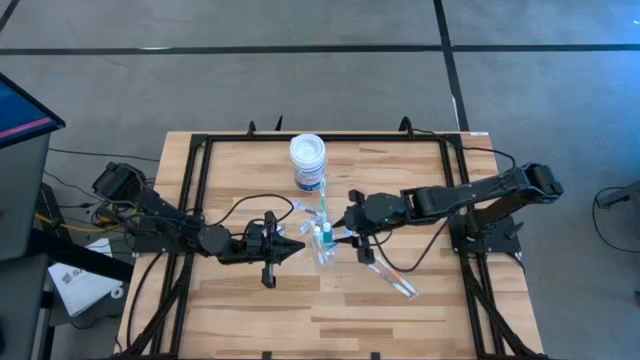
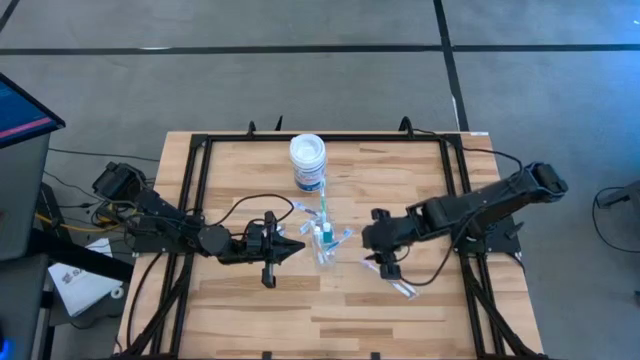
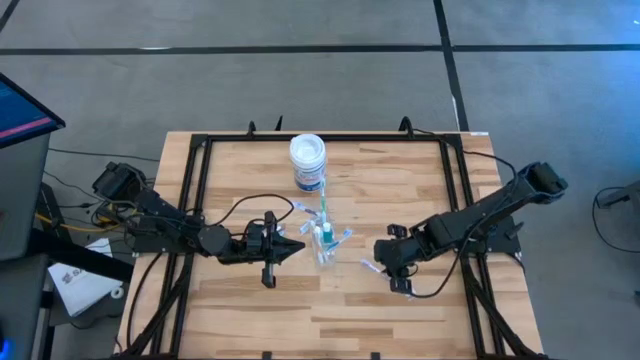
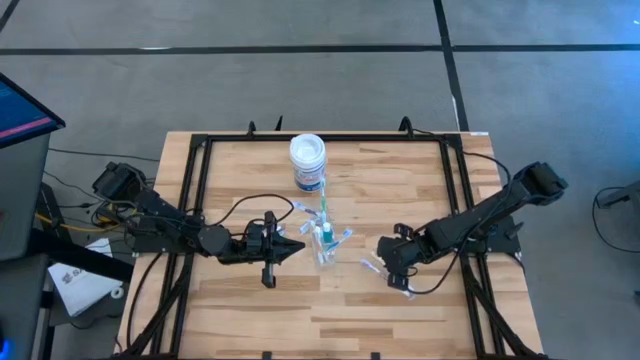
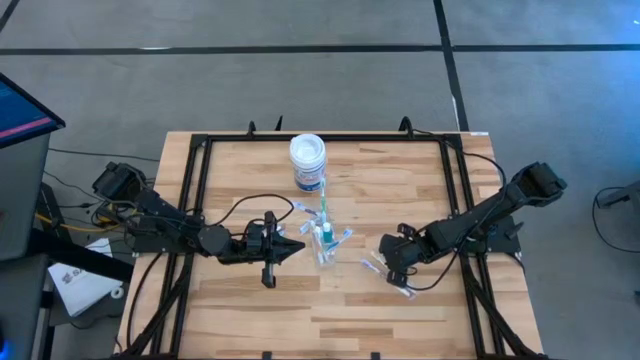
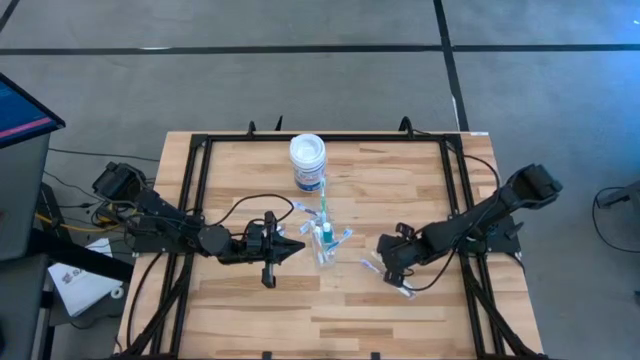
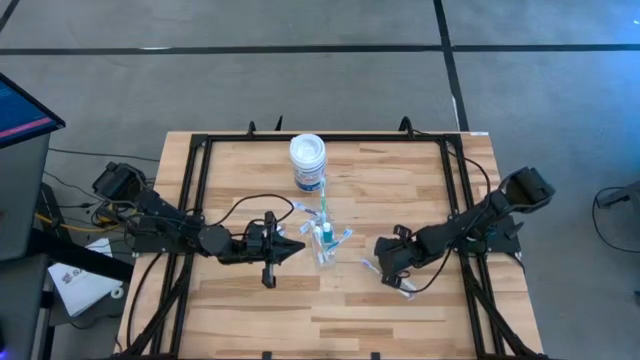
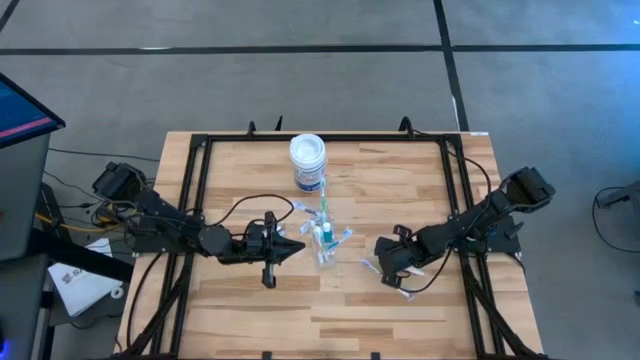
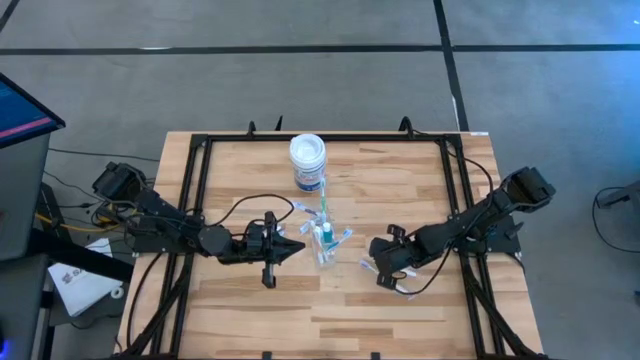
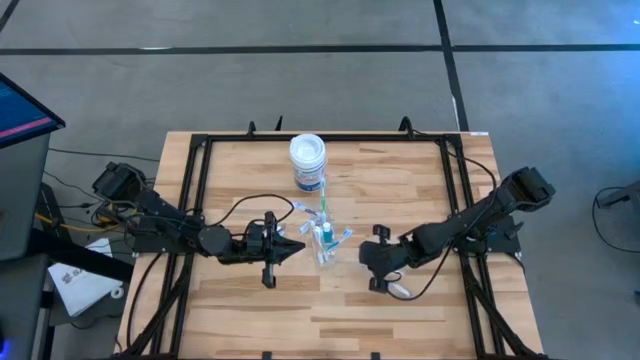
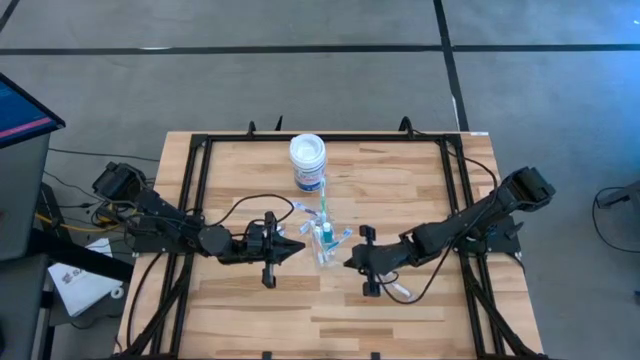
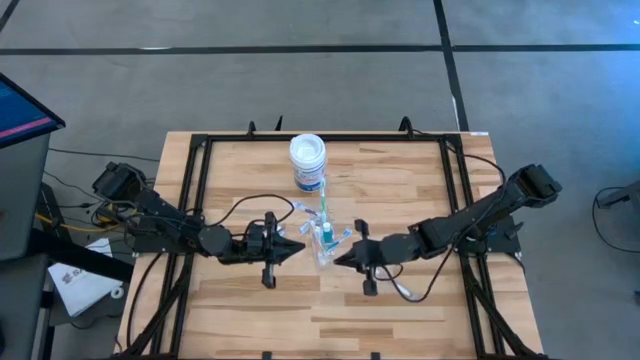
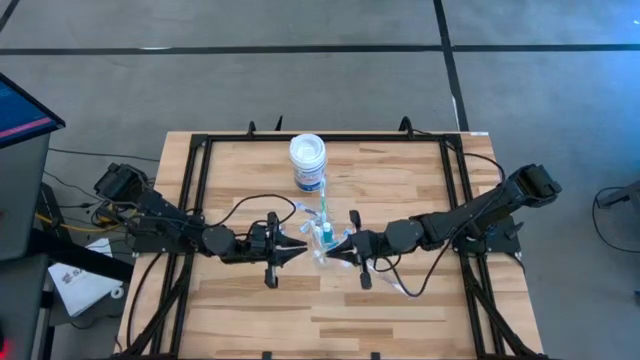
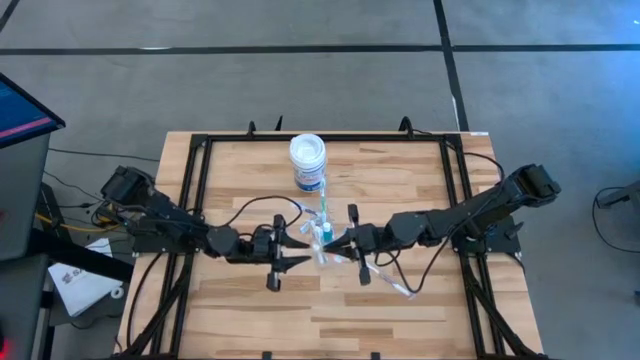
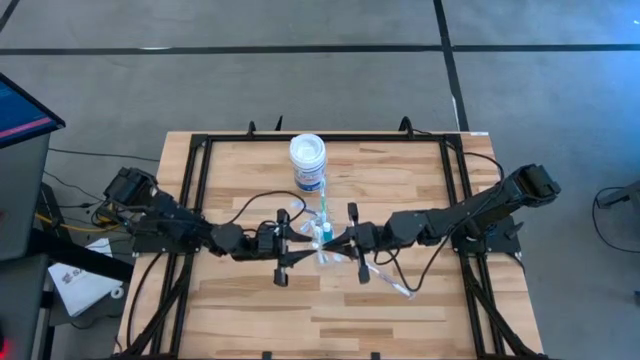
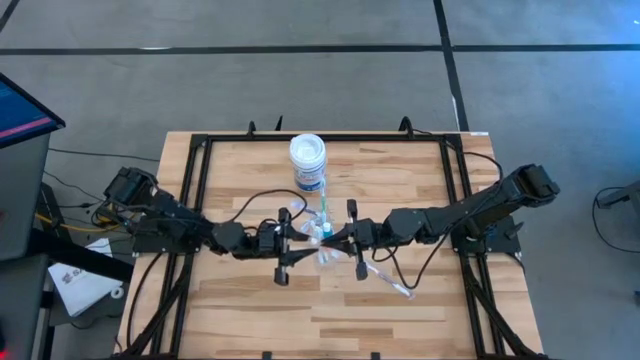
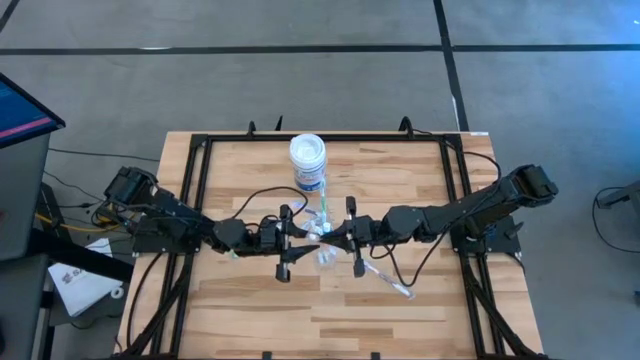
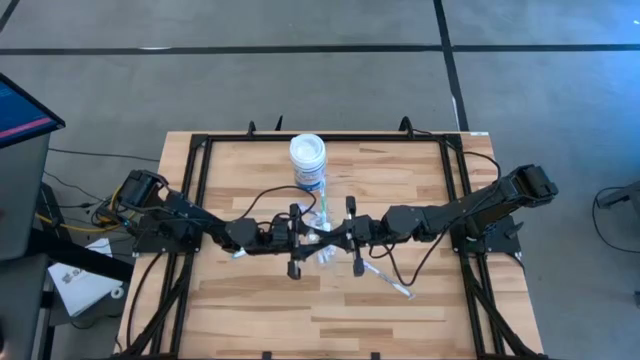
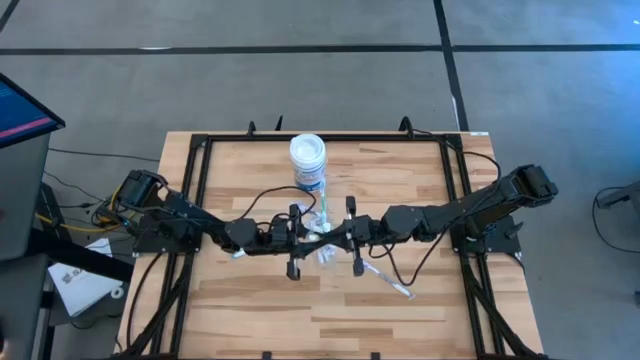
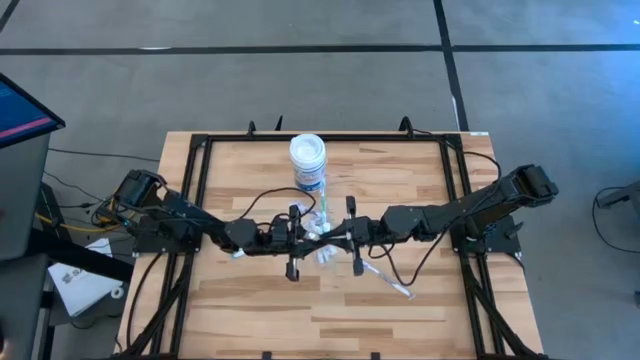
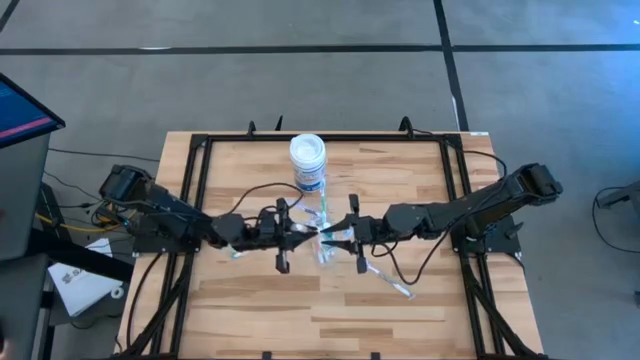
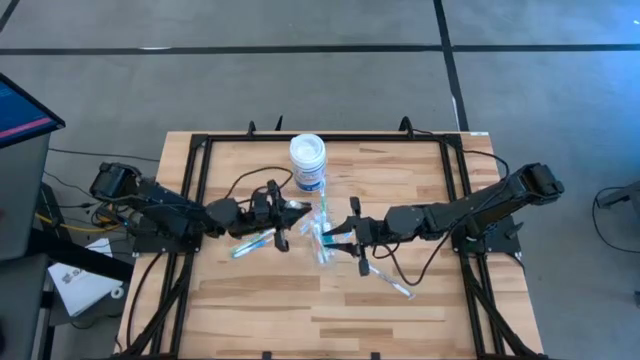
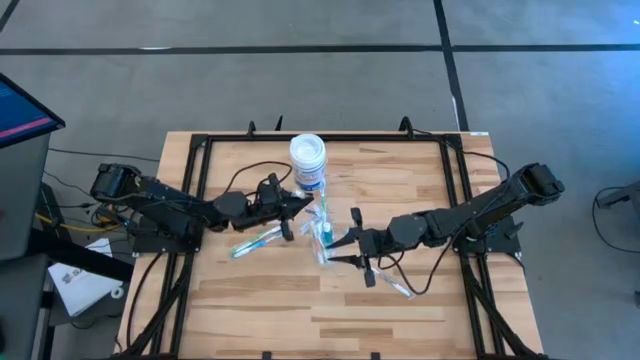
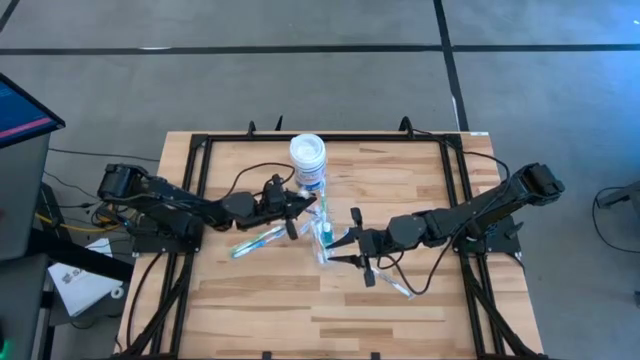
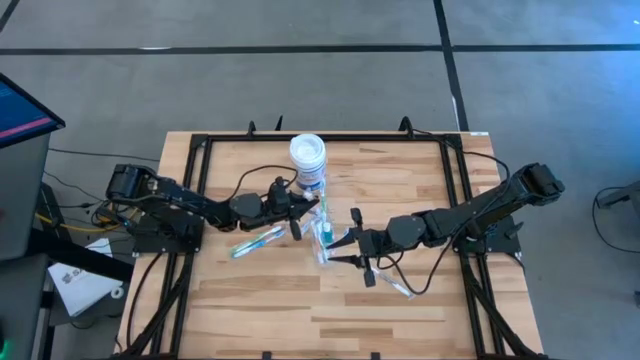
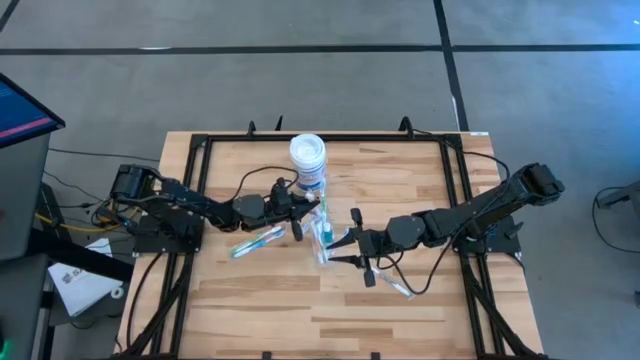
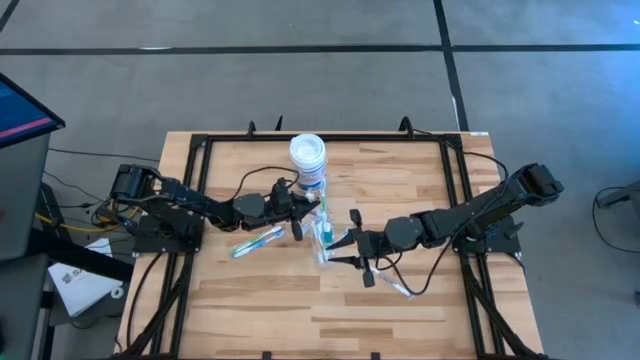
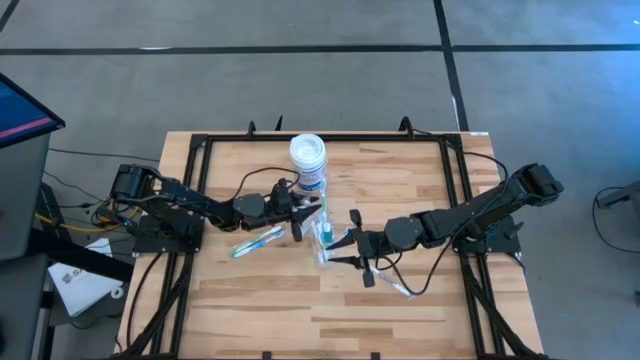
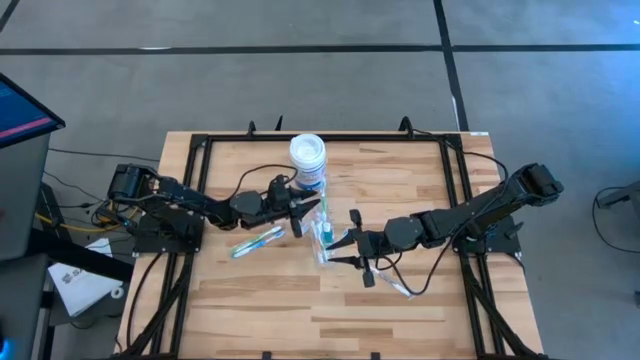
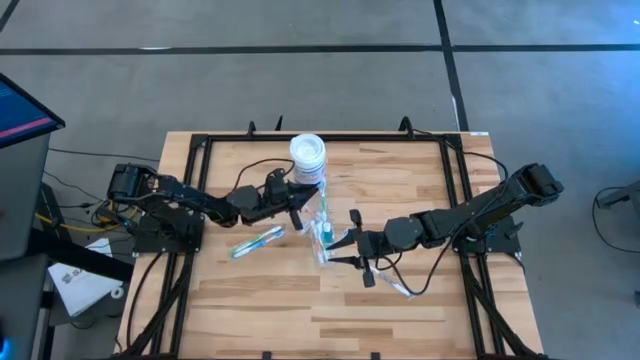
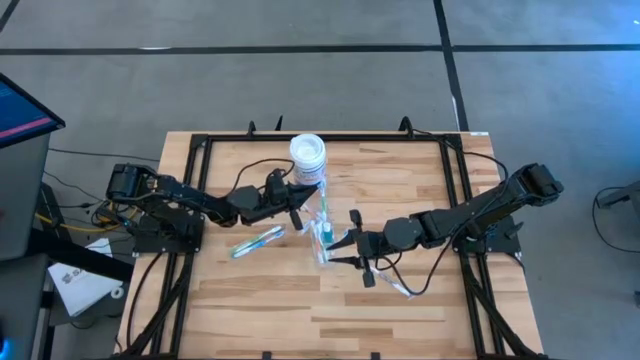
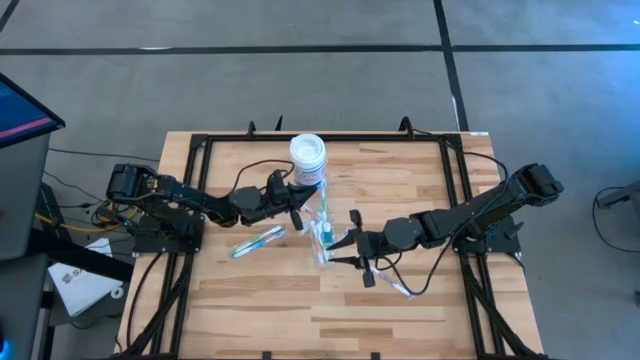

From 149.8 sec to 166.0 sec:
Task: Pick & Place toothbrushing station
Put the orange toothbrush into the Transparent organizer

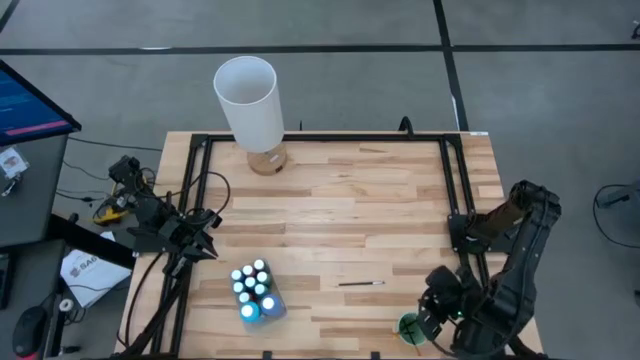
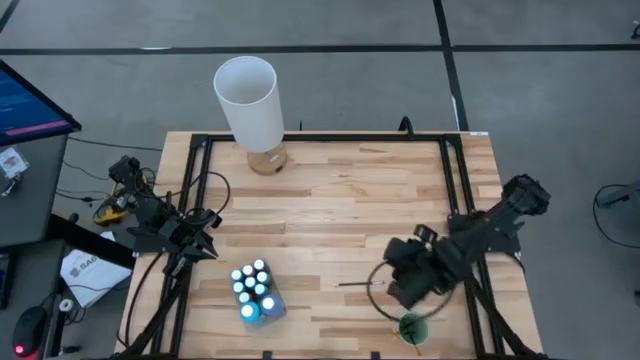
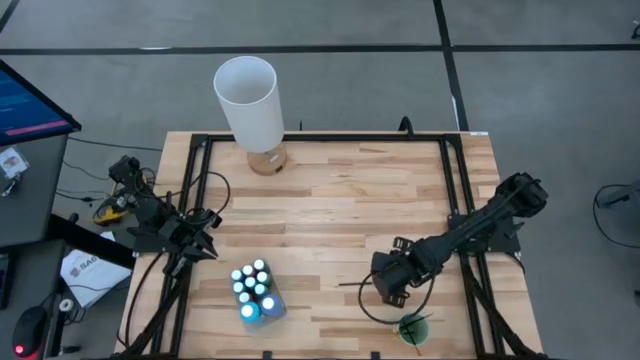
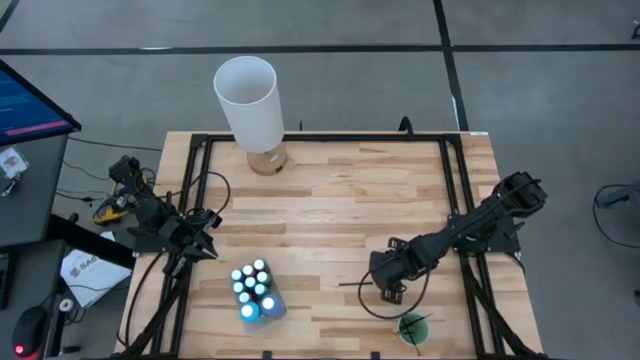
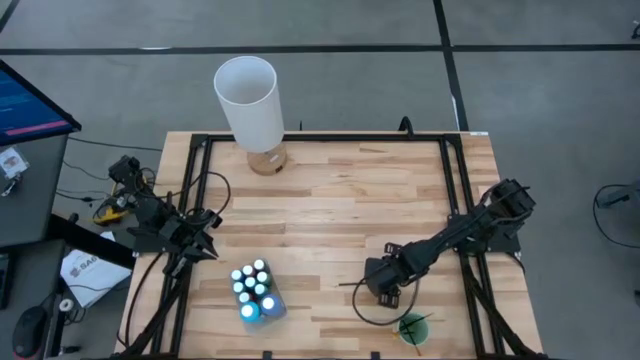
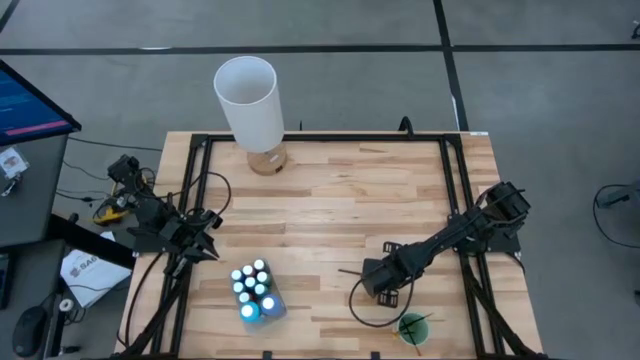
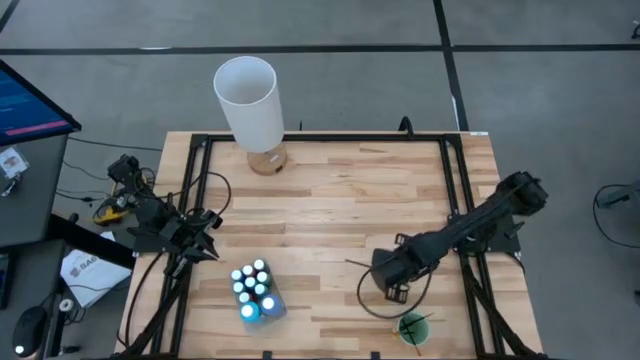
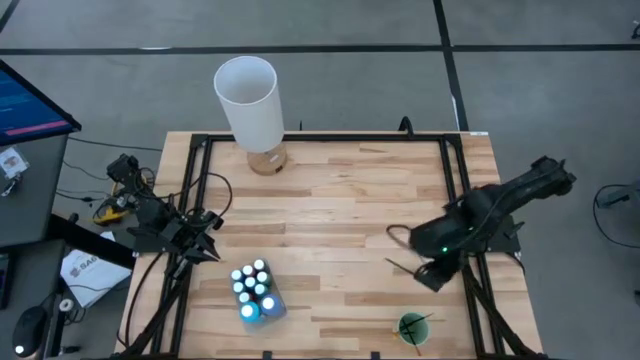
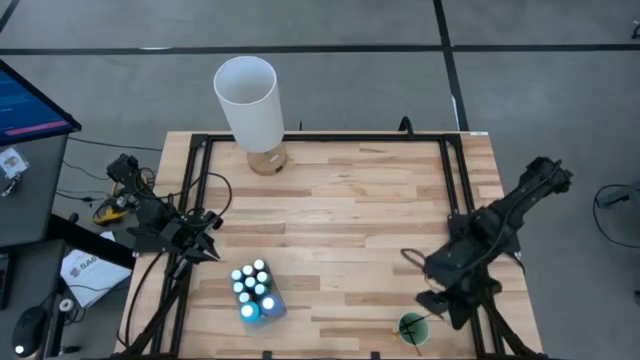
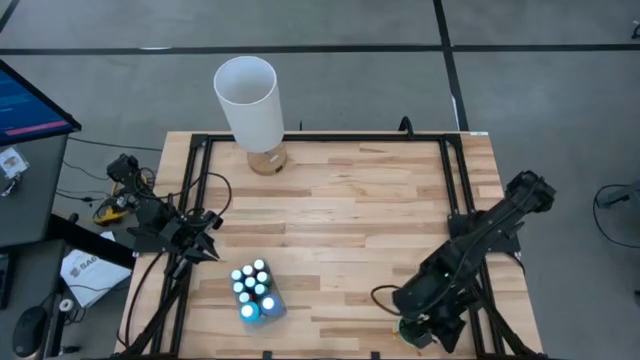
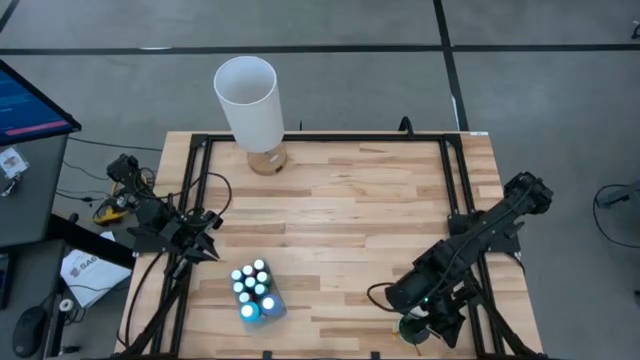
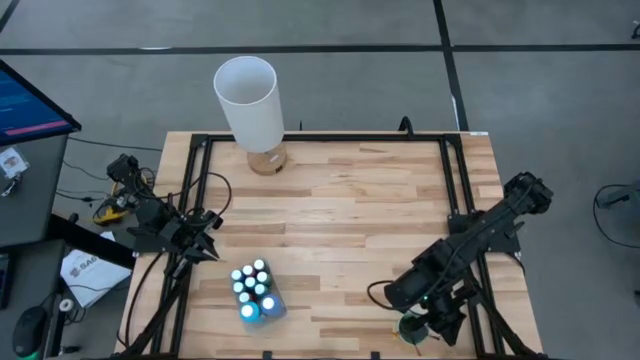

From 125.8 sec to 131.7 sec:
Task: Pick & Place Paint Supplies
Put the silver eyeshadow brush into the green cup
